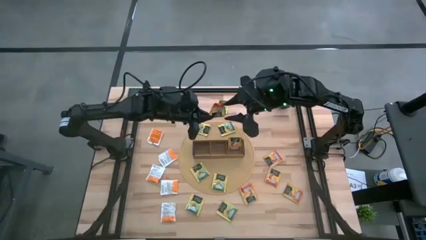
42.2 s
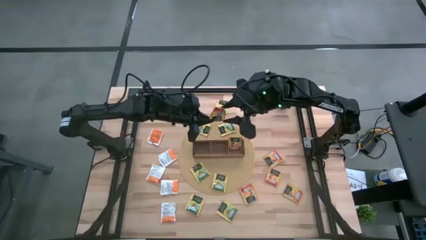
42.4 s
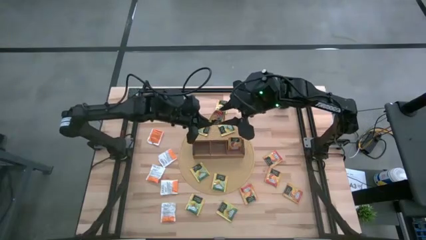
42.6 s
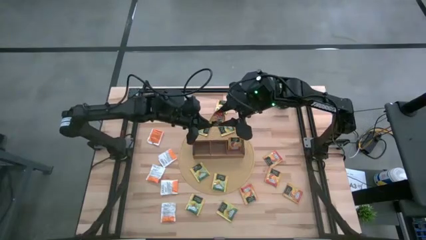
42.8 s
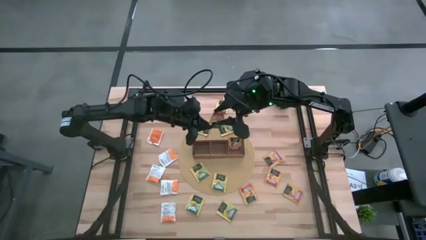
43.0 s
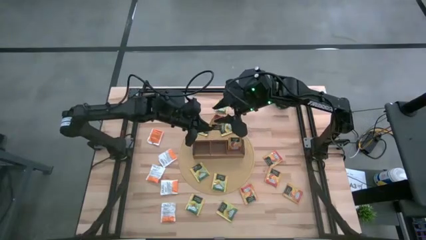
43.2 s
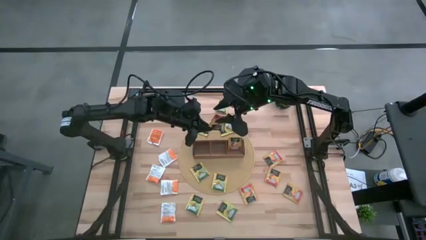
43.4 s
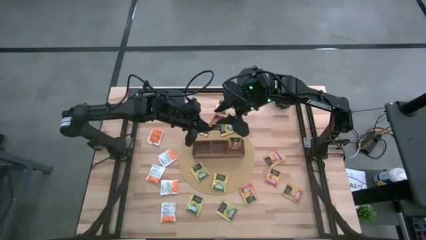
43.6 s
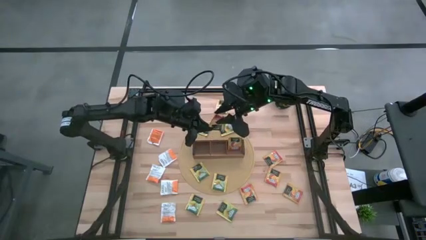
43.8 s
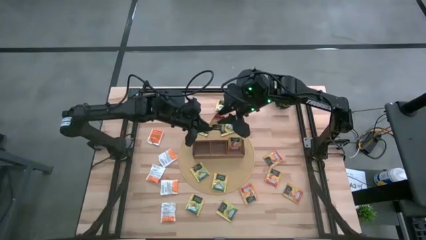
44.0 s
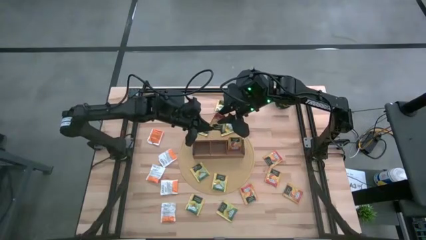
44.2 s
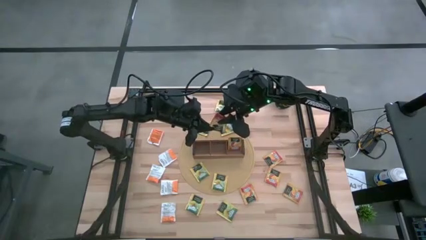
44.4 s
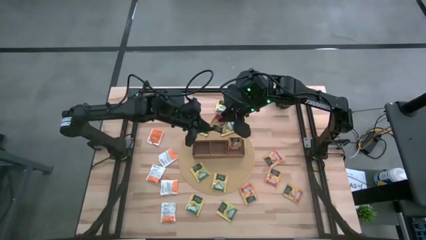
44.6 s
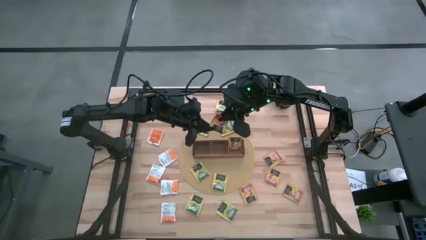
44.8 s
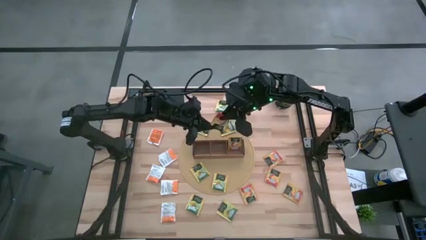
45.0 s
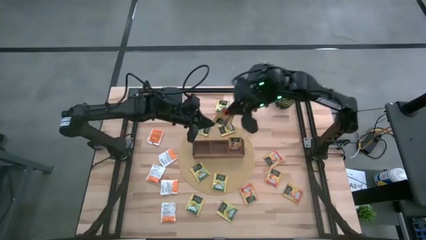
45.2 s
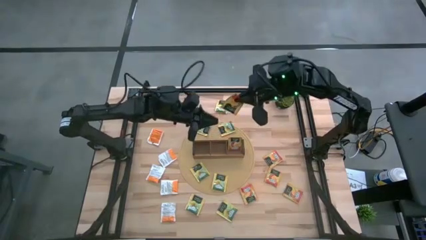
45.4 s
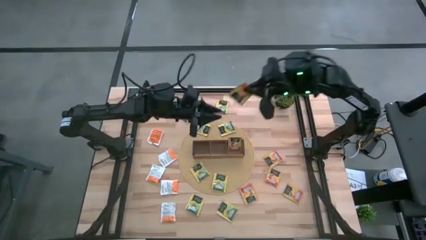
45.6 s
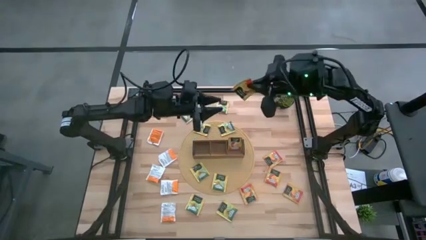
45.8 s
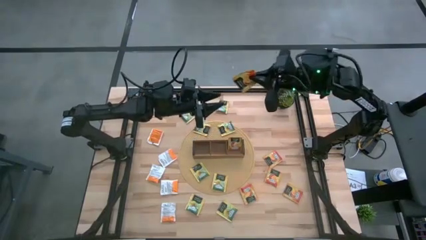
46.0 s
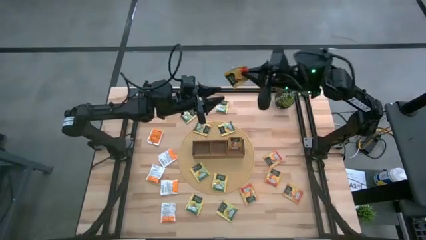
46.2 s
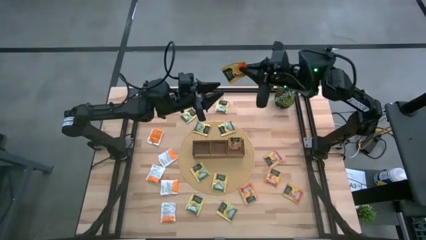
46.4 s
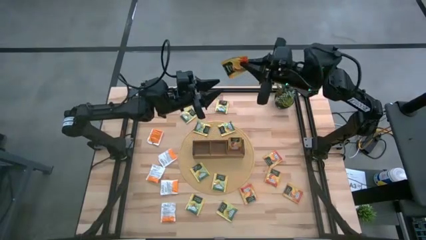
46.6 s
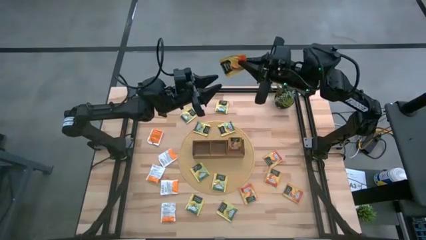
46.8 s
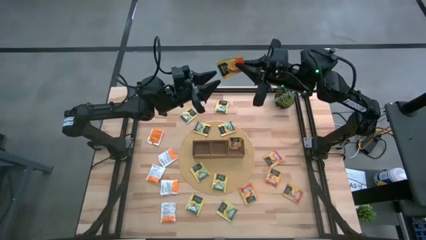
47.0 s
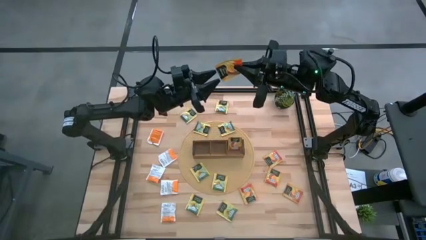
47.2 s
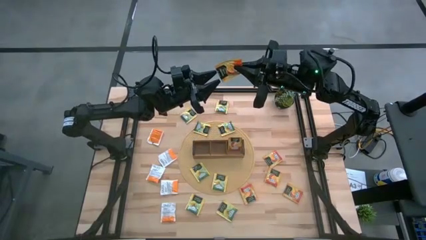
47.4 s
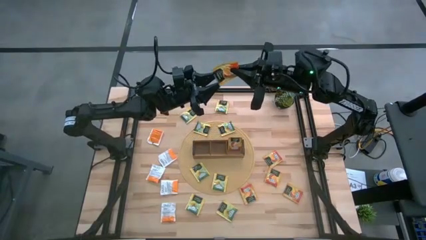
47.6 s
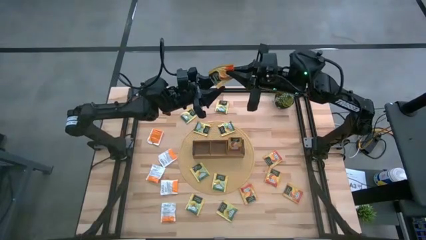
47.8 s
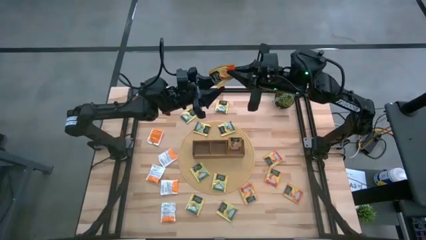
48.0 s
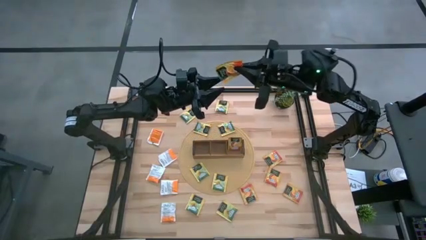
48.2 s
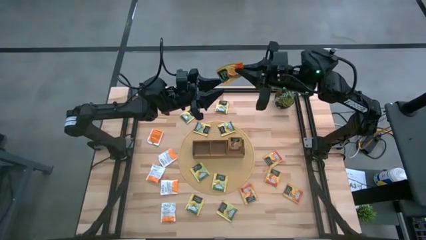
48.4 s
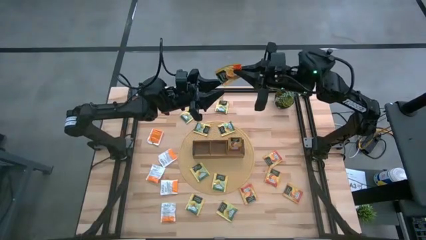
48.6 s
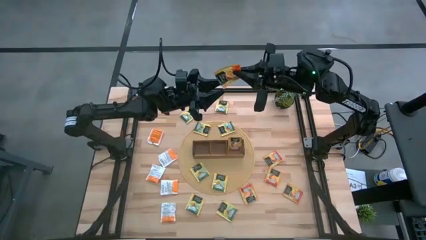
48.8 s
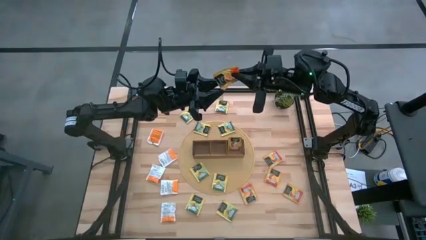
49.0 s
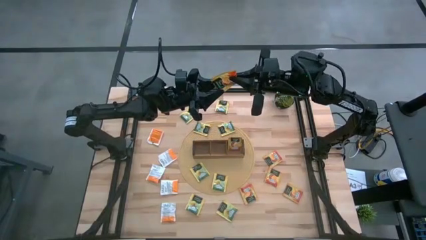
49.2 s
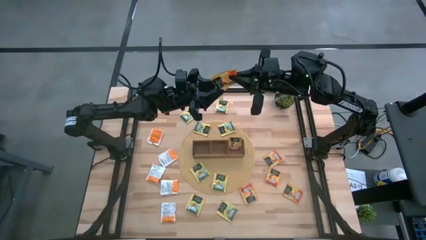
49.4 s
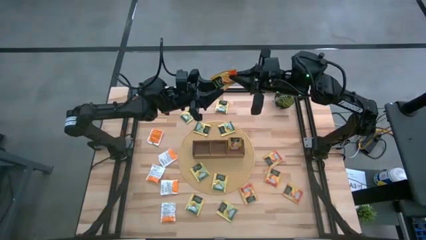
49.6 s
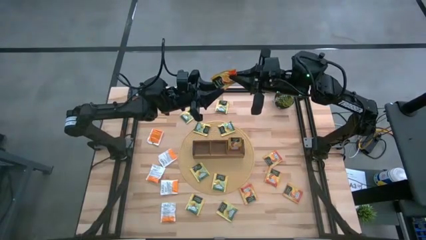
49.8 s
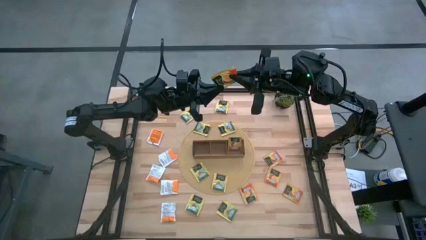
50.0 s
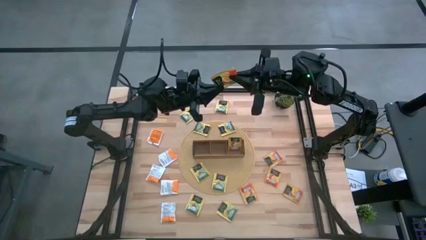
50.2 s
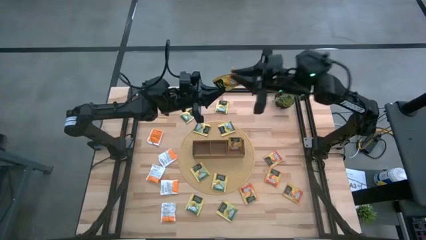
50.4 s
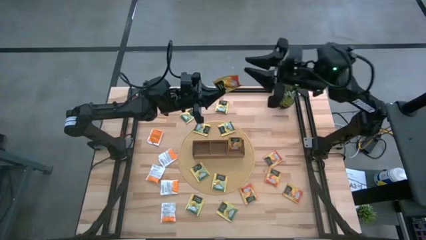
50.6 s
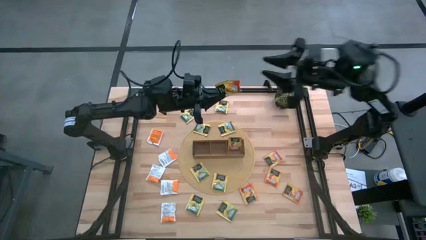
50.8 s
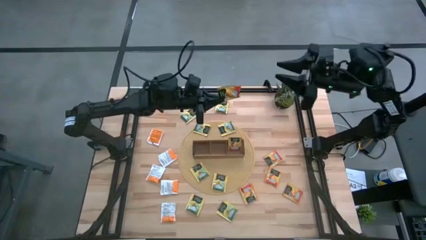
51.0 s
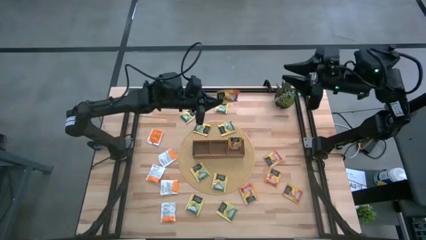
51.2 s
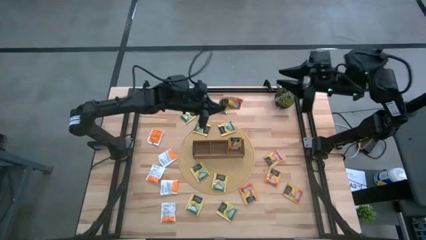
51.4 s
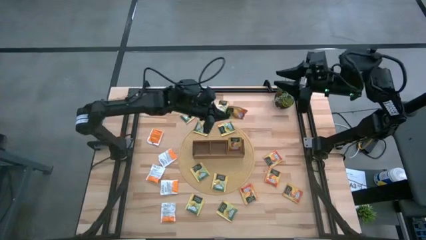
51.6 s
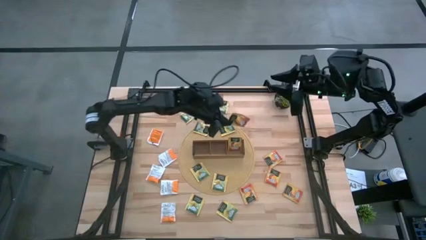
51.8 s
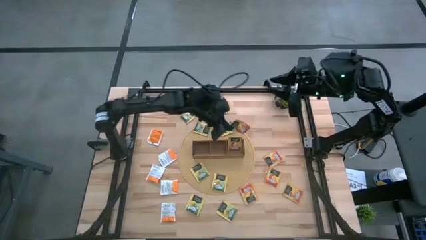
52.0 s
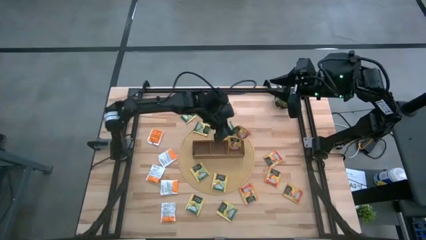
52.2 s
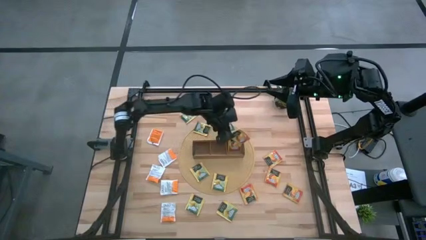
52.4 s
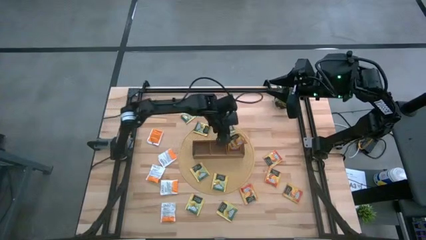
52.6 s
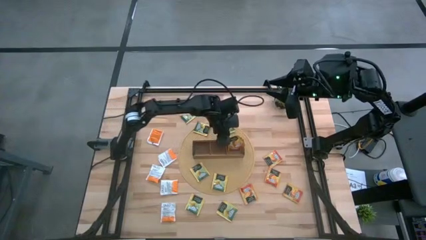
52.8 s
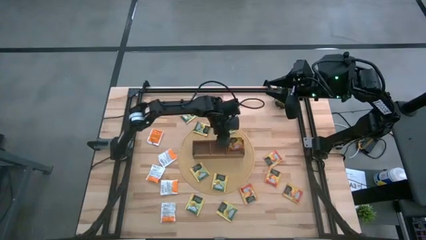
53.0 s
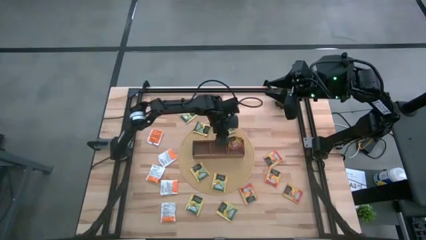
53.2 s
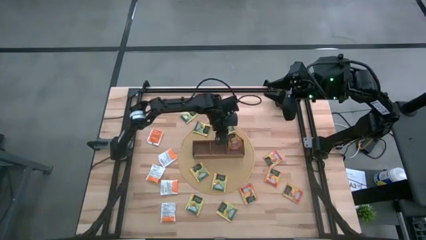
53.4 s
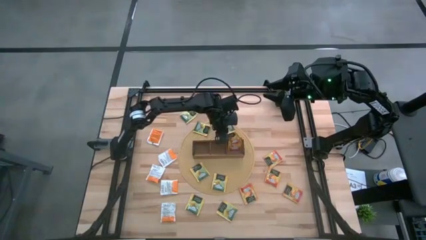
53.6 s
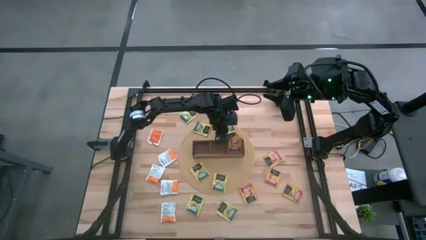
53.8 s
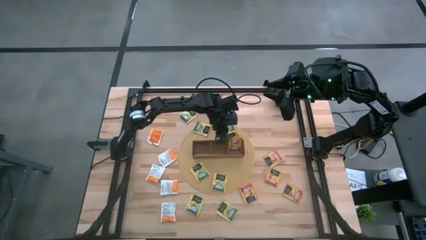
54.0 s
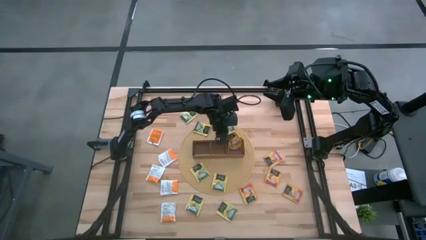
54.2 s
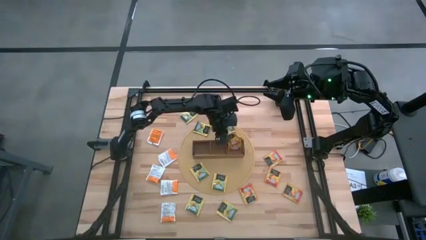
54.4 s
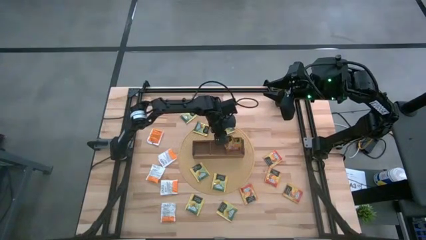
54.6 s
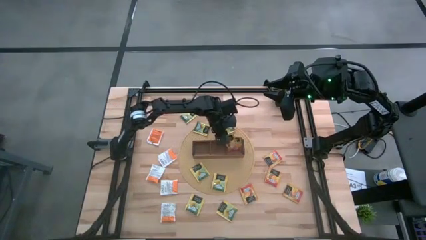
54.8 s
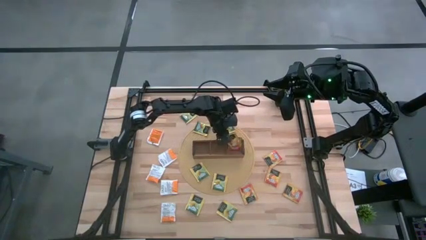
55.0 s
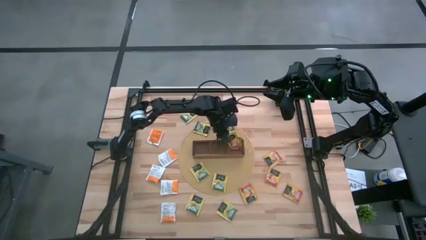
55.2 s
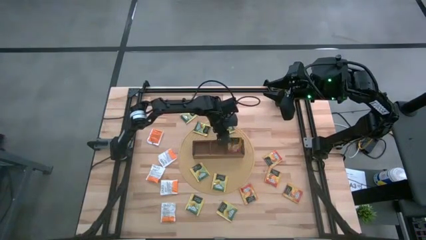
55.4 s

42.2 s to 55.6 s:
Task: Pick & Place Tea
Put the orange tea bag into the right section of the wooden organizer

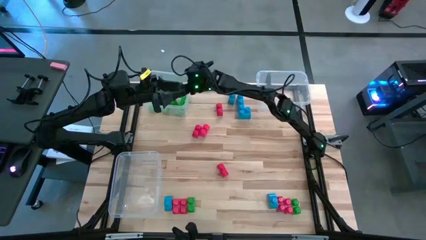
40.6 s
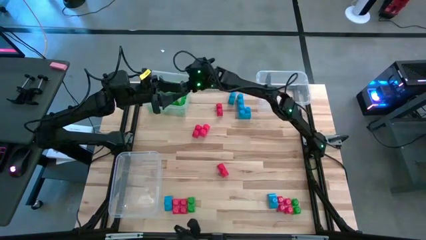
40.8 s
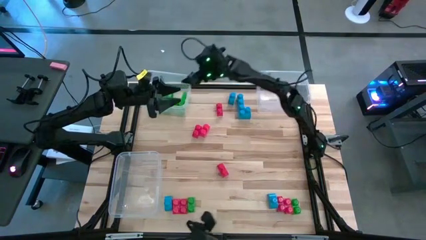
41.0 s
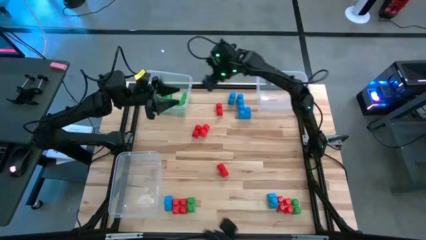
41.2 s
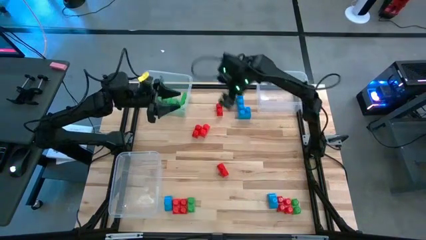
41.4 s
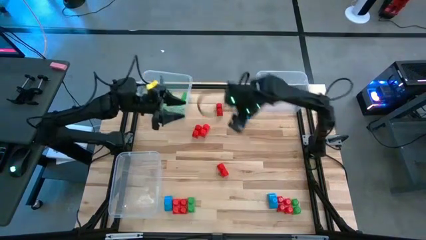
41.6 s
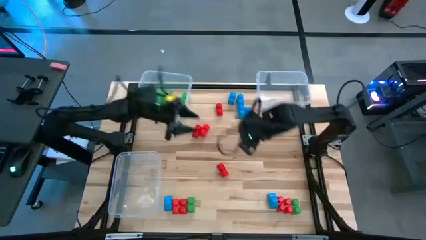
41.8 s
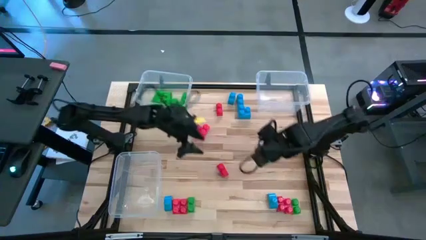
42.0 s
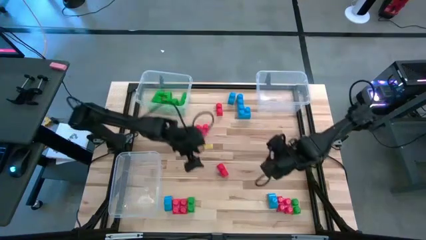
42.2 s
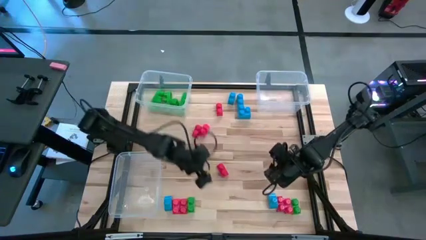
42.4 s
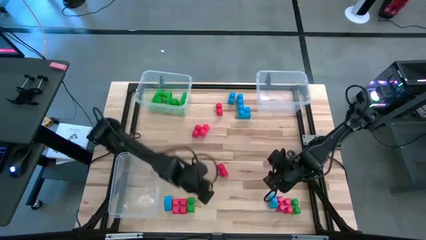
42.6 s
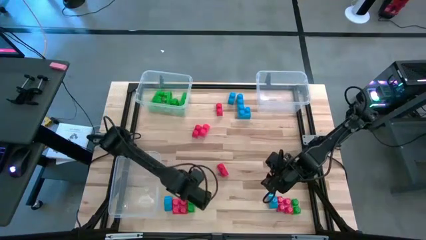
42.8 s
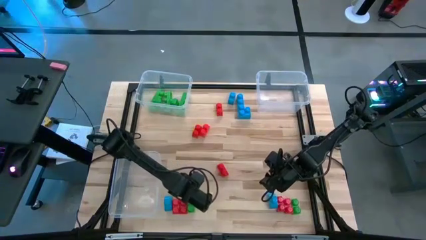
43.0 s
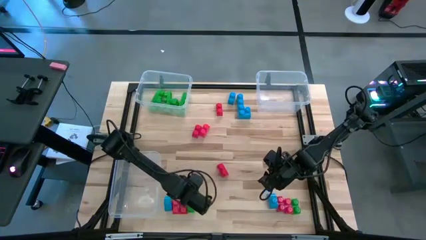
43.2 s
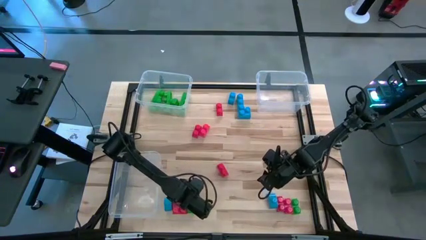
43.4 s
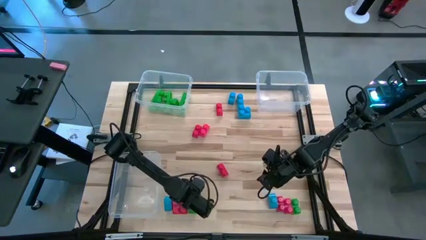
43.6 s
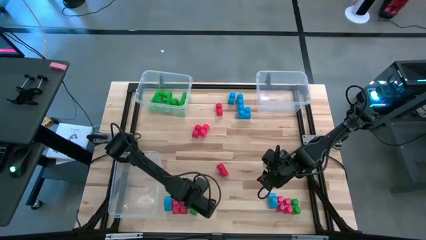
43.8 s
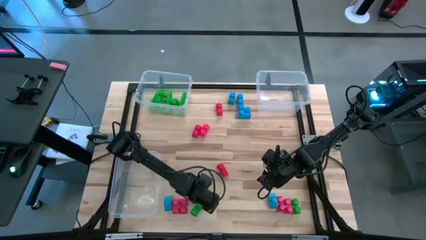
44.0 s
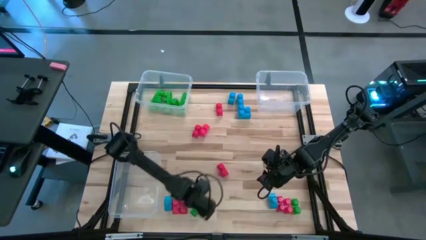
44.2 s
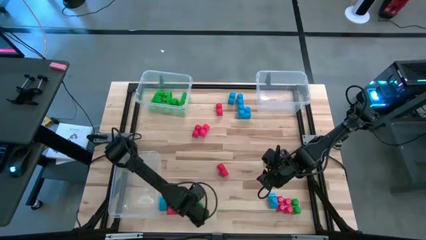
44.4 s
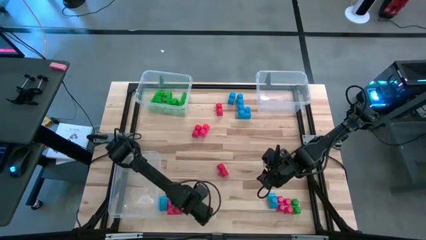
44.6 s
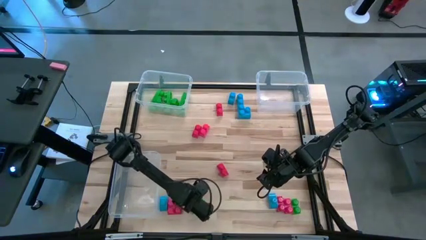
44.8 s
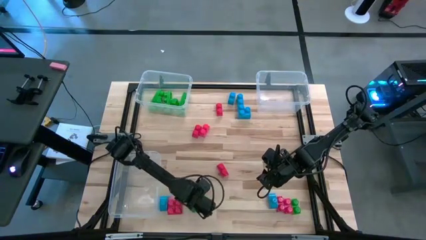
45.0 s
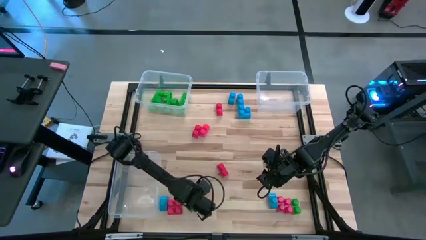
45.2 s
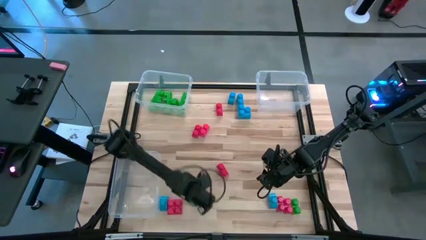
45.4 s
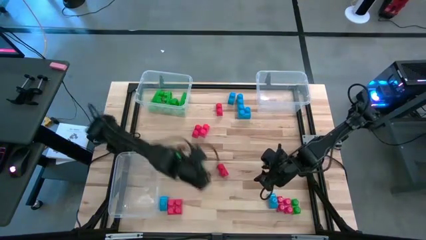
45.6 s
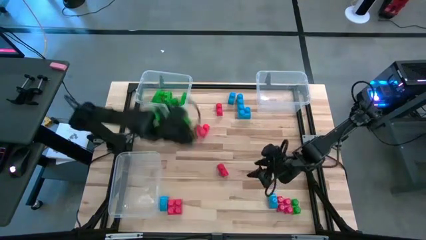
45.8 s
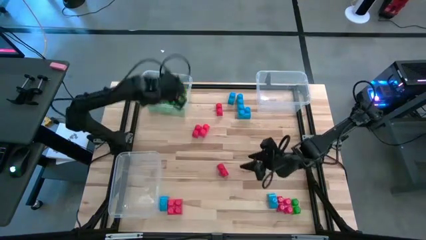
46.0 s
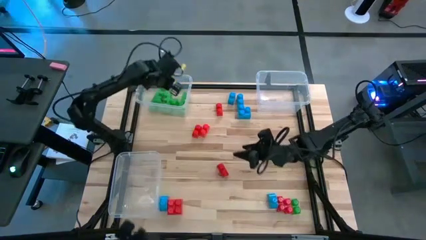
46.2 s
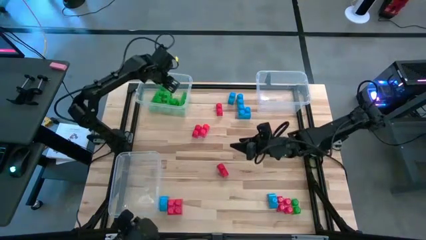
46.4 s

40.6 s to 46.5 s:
Task: Sort blocks
Put the green game piece into the top left transparent bin
